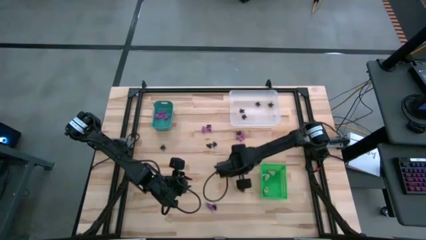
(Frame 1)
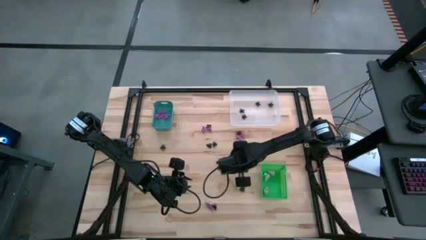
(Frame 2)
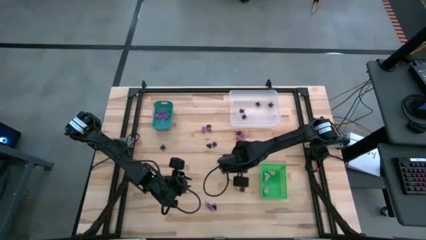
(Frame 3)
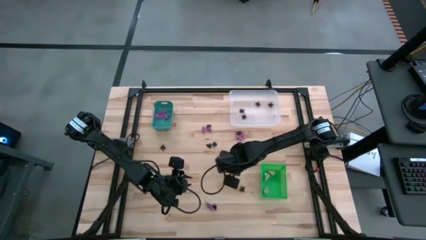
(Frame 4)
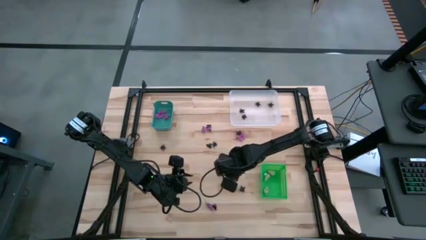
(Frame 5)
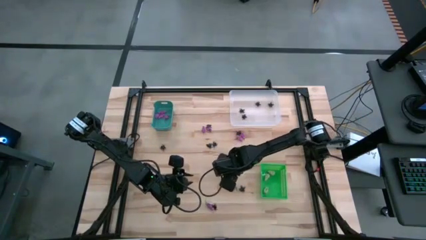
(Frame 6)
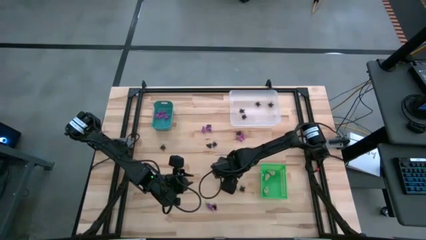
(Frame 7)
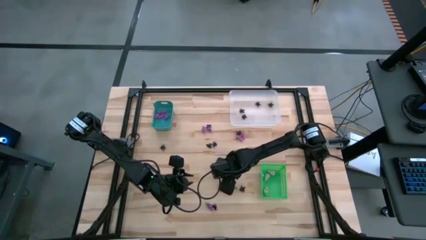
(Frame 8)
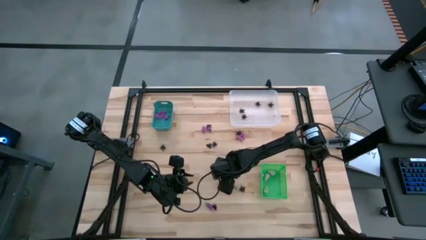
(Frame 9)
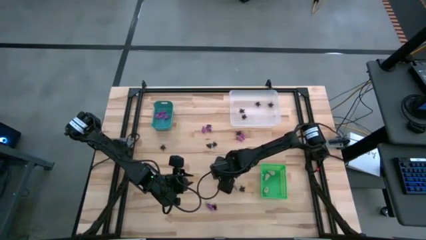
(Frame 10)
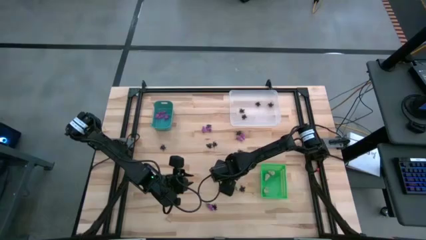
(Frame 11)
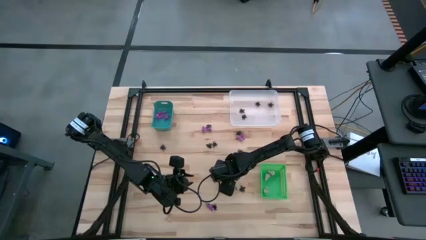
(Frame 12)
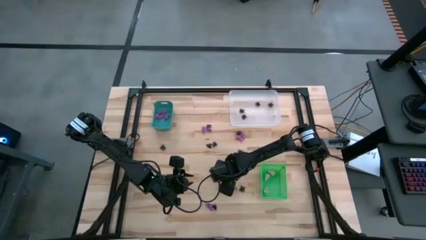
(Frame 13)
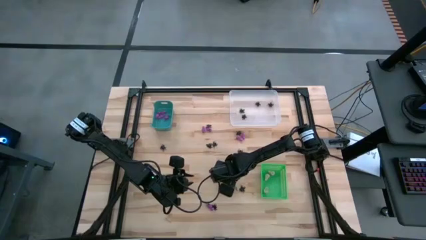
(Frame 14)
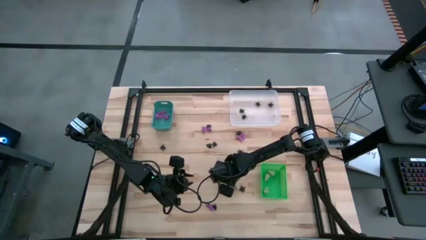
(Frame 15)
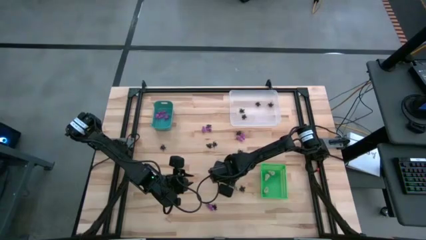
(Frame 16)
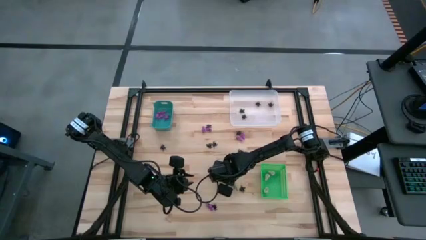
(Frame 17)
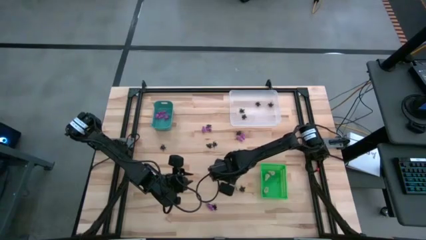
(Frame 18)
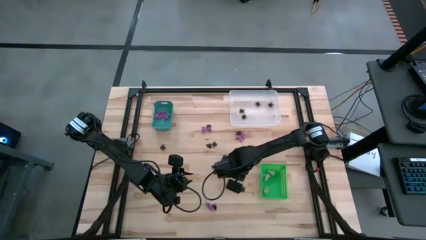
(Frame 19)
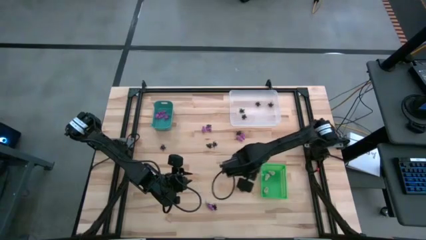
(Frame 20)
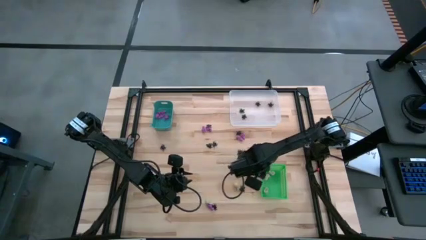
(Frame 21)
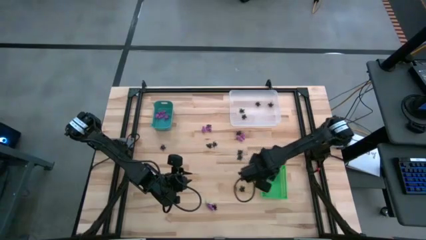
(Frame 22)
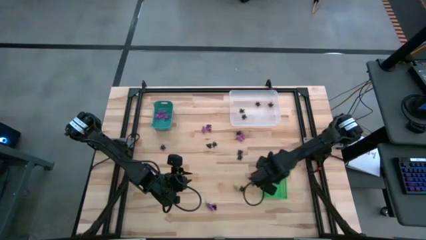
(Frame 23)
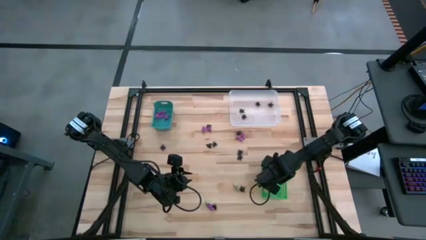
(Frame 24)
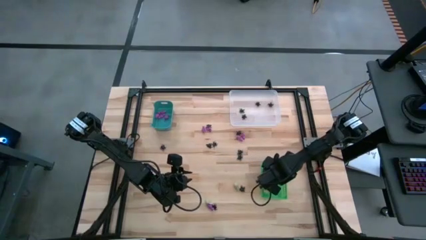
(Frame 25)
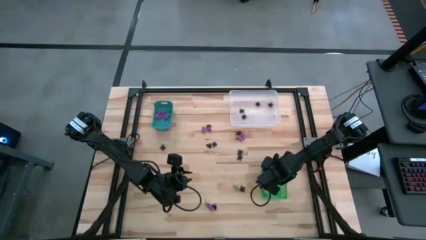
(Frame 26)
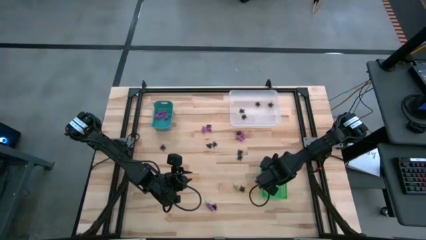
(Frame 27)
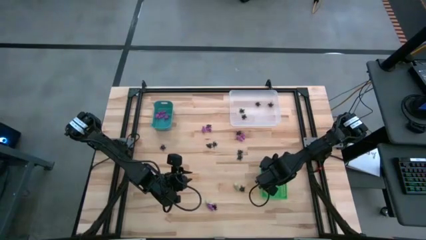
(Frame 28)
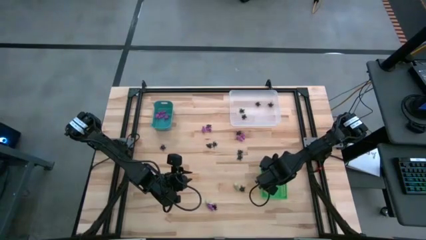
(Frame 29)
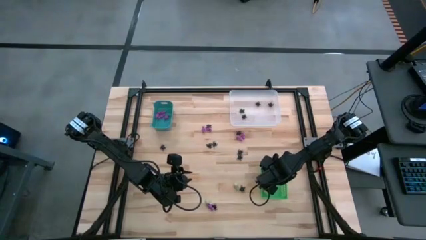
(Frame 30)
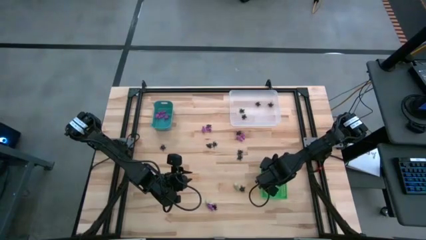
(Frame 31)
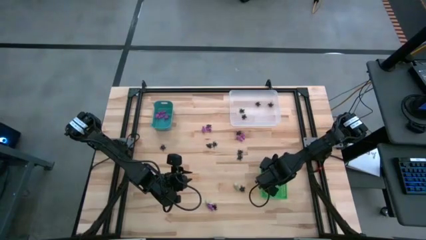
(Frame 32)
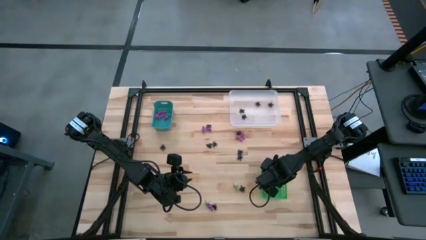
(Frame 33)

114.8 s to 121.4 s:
Task: Sort Halloween decoration
Put the white skull toy into the green bin

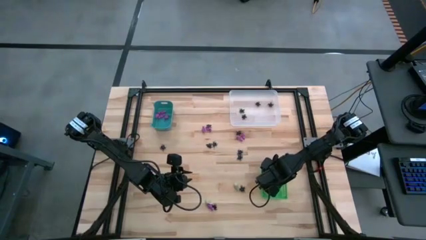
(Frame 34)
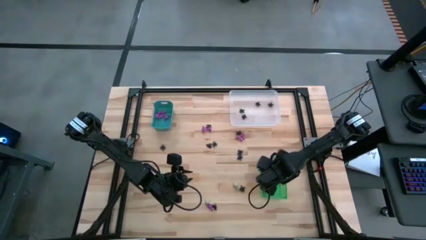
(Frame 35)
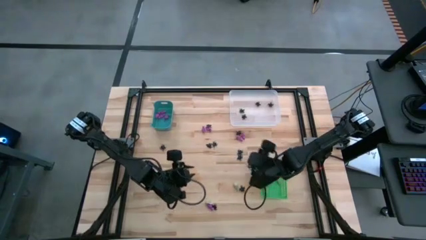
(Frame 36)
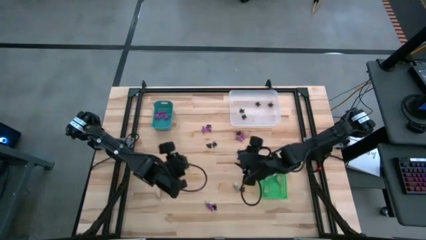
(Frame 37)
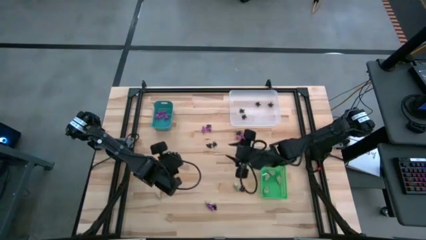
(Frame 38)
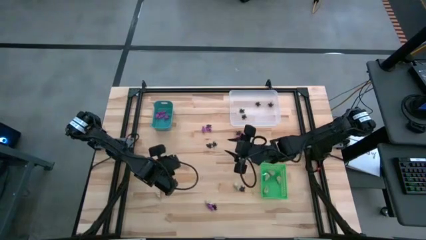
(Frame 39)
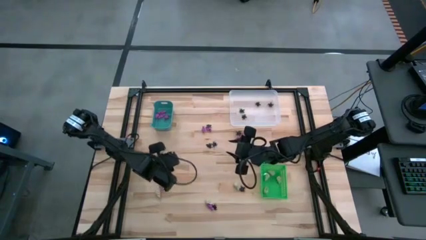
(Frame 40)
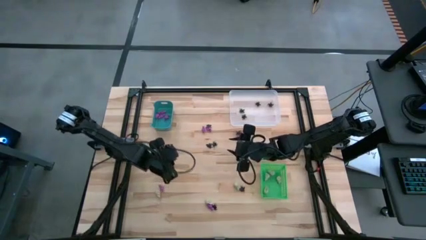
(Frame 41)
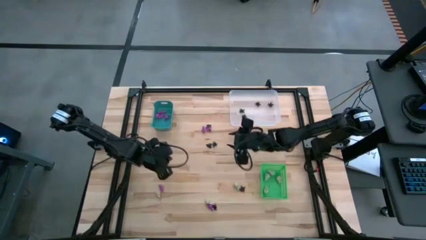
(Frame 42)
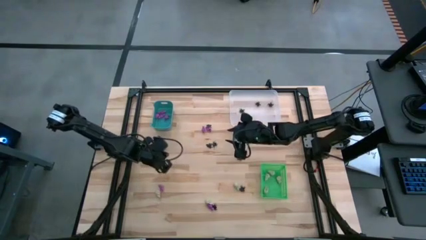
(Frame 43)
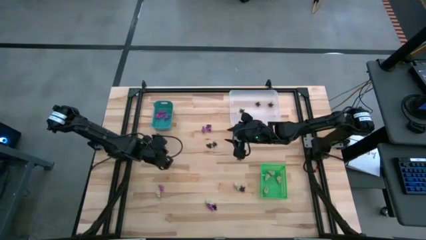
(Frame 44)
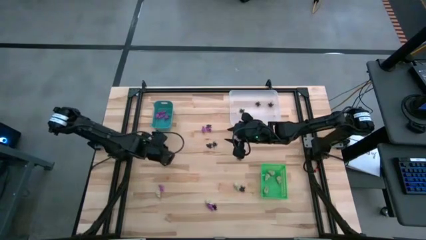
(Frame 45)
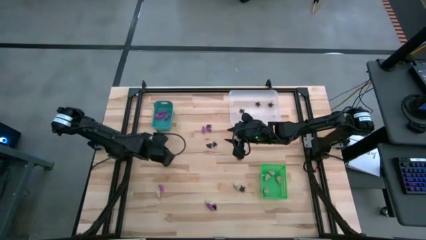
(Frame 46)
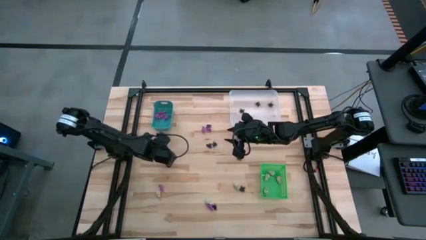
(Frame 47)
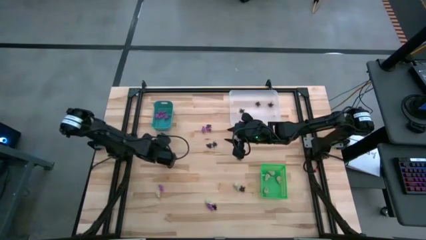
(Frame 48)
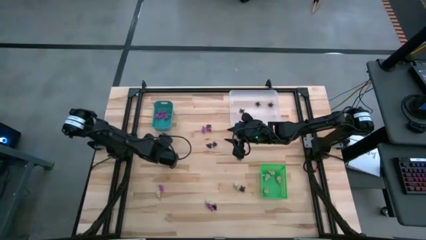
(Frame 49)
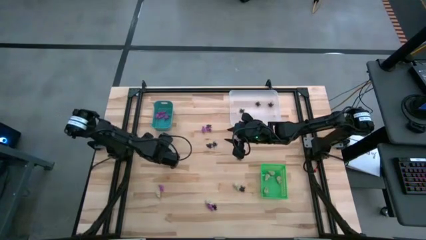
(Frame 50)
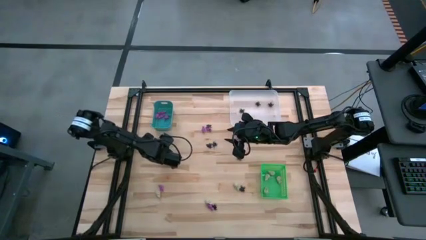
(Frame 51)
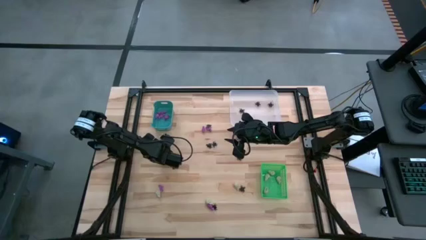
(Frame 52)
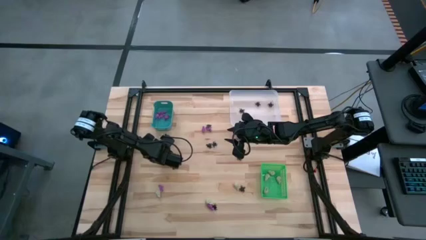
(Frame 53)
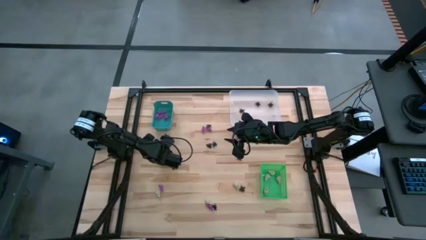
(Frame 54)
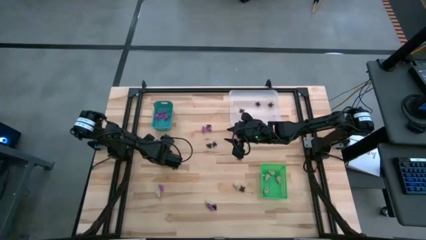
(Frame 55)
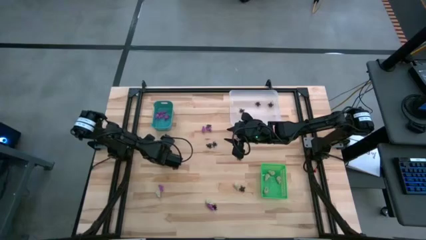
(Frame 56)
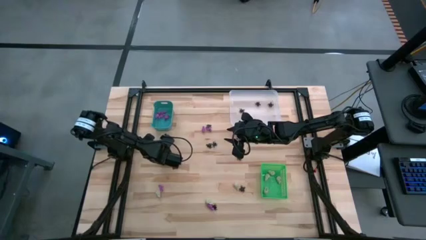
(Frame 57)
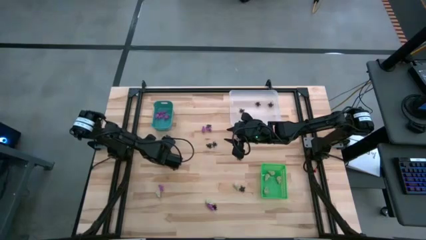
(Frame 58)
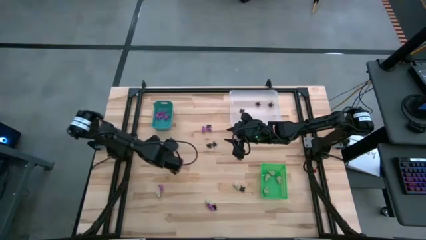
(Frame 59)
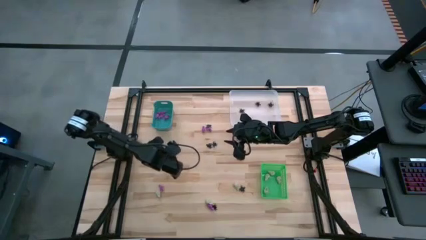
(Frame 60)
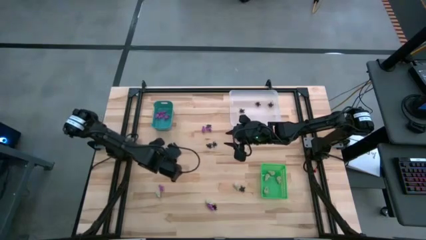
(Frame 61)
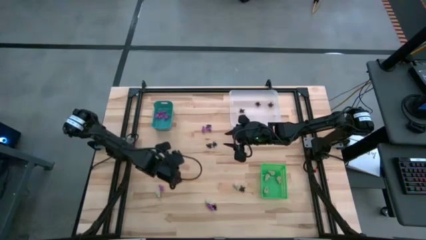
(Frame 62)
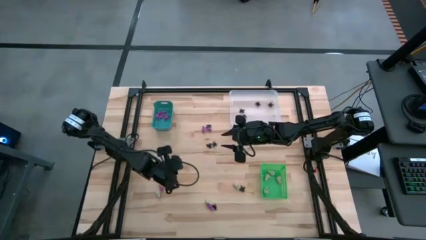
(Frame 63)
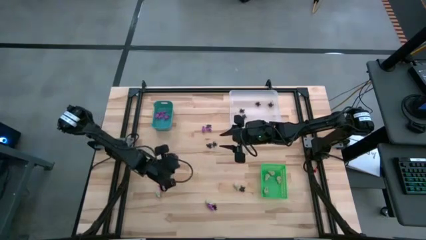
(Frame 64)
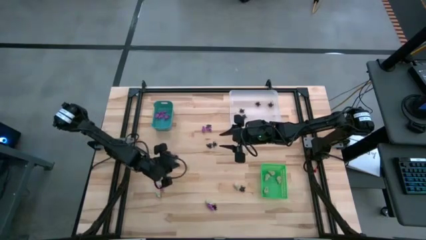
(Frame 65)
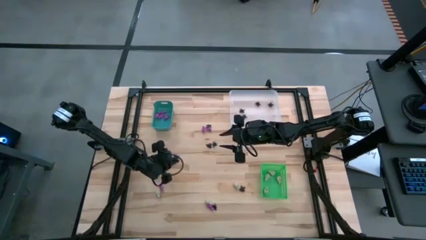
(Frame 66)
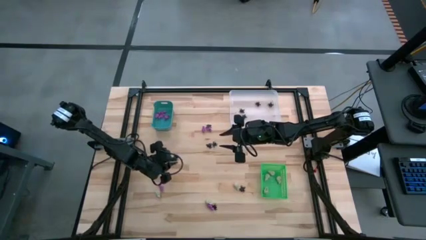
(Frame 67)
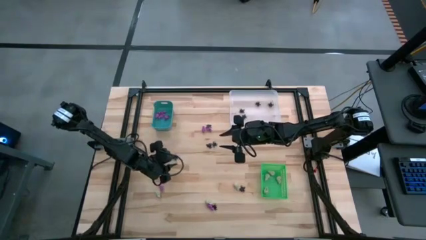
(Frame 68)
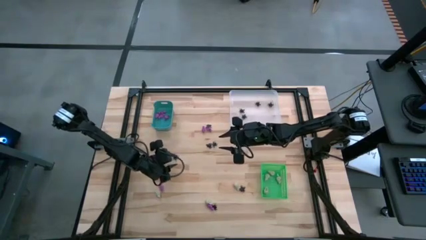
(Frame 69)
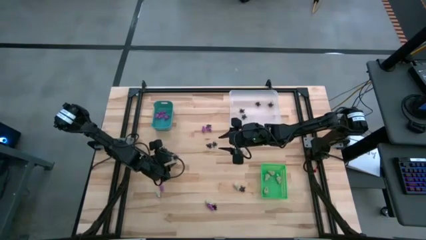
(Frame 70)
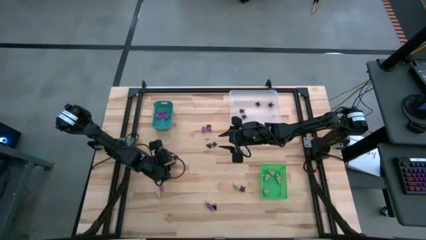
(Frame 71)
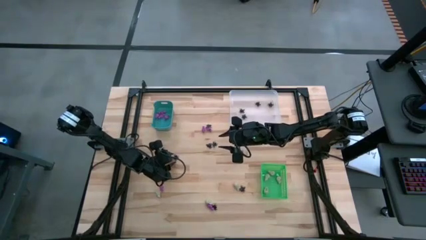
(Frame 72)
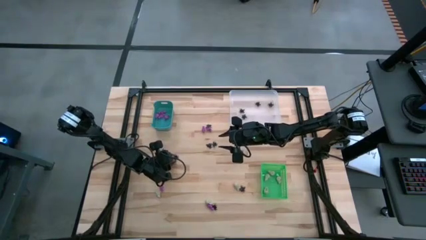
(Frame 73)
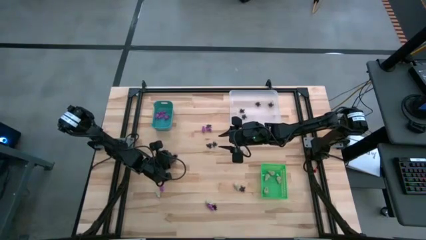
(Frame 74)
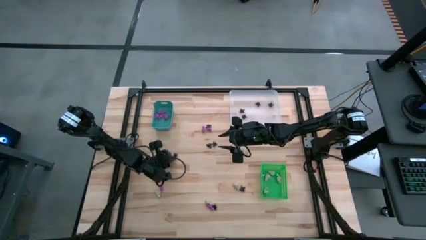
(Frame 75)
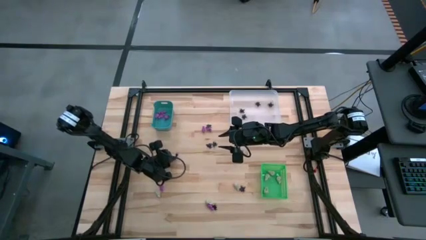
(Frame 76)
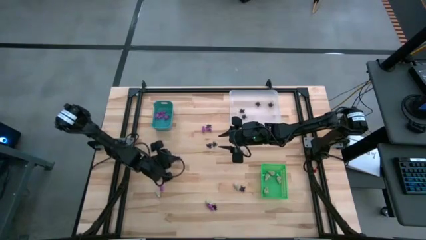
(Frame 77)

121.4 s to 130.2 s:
Put the black spider toy into the white bin
